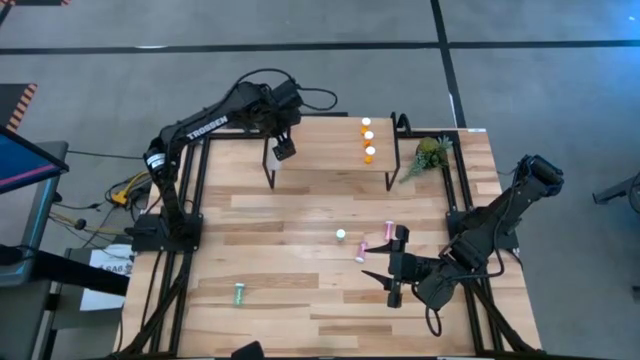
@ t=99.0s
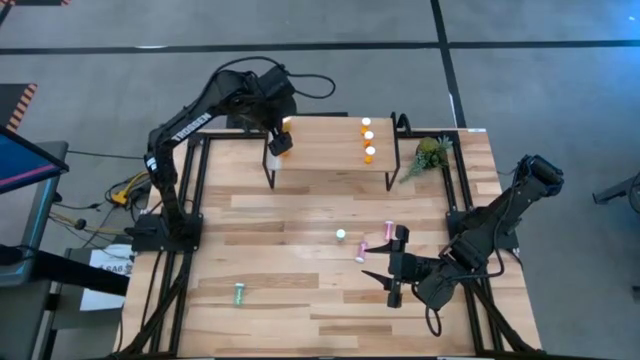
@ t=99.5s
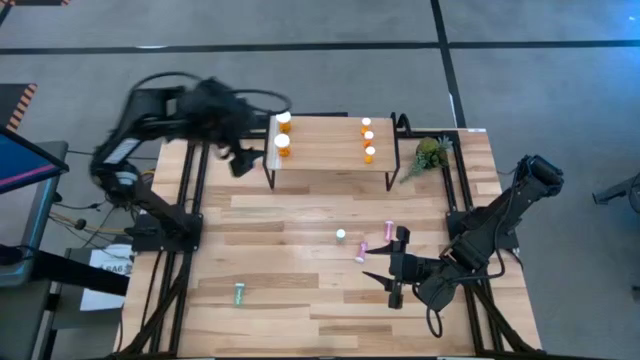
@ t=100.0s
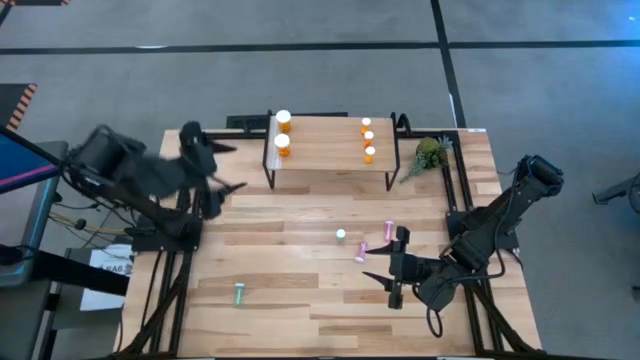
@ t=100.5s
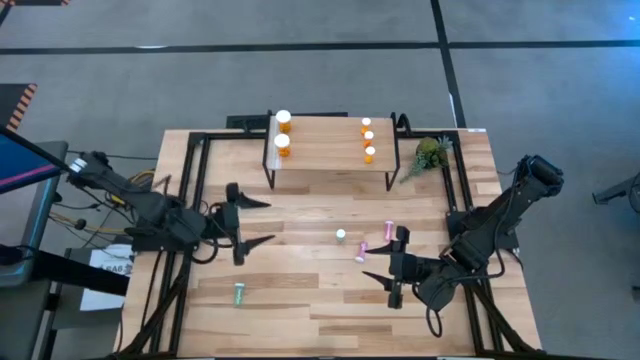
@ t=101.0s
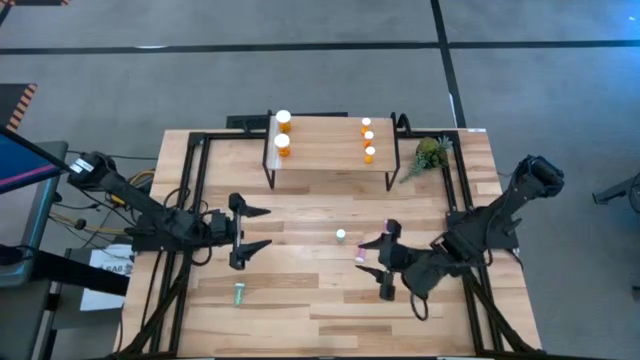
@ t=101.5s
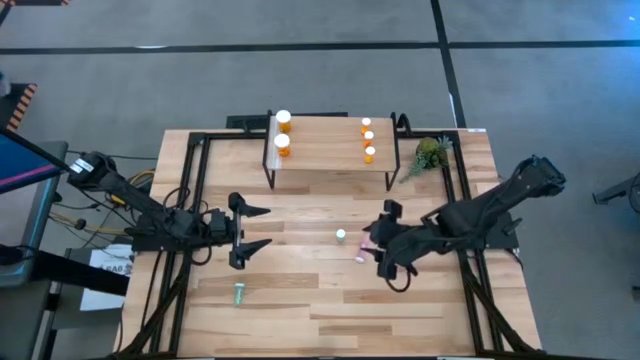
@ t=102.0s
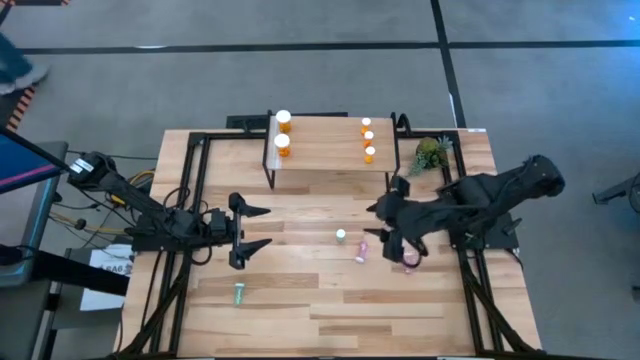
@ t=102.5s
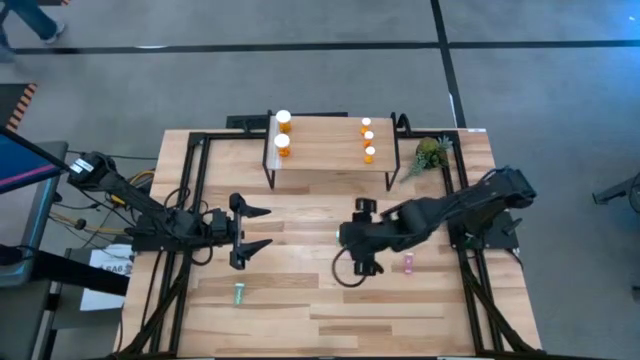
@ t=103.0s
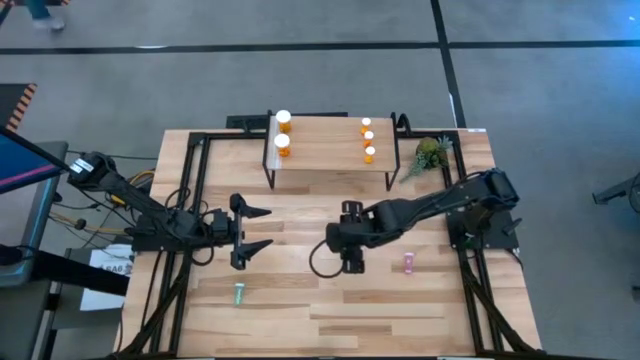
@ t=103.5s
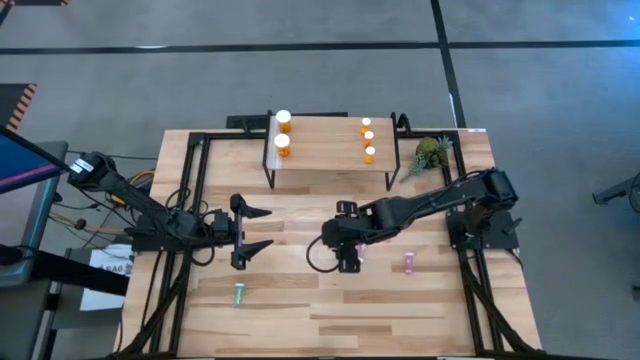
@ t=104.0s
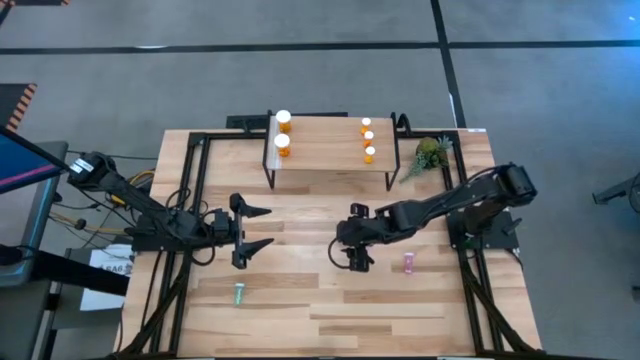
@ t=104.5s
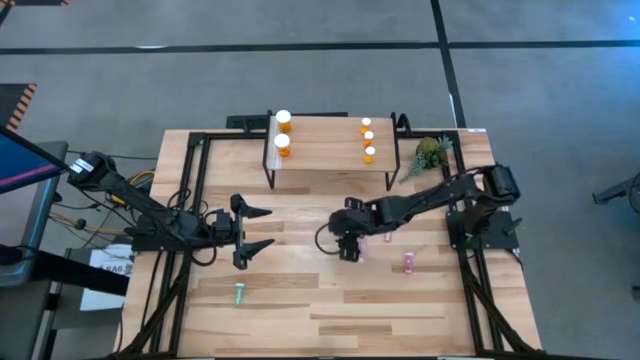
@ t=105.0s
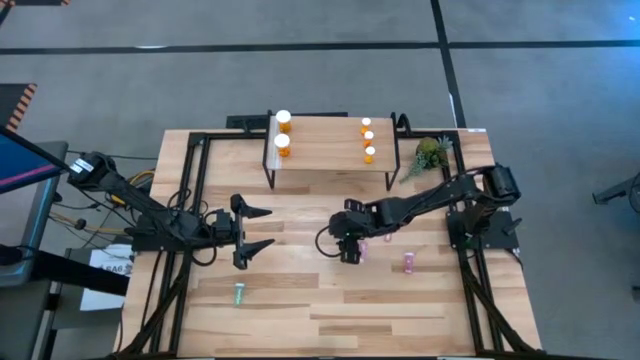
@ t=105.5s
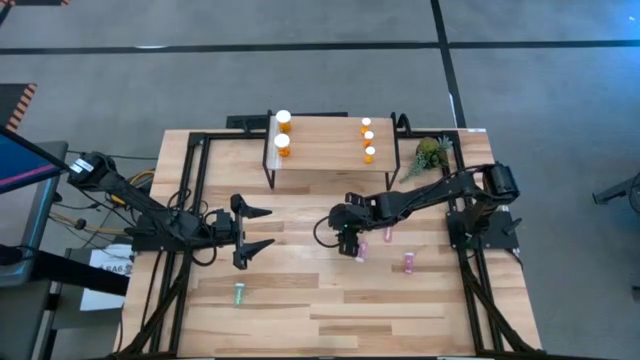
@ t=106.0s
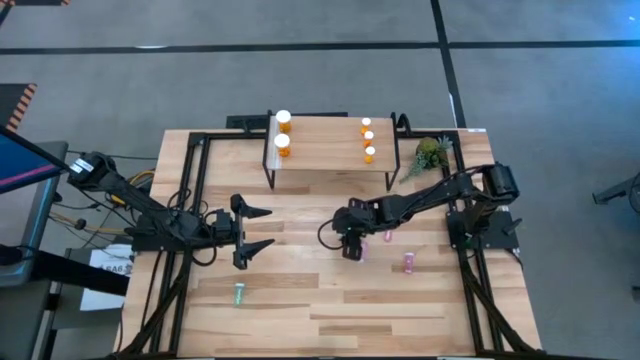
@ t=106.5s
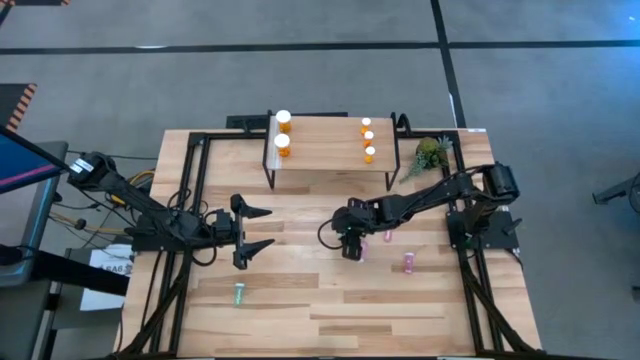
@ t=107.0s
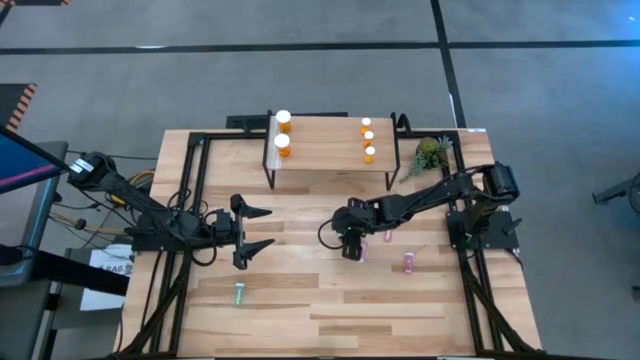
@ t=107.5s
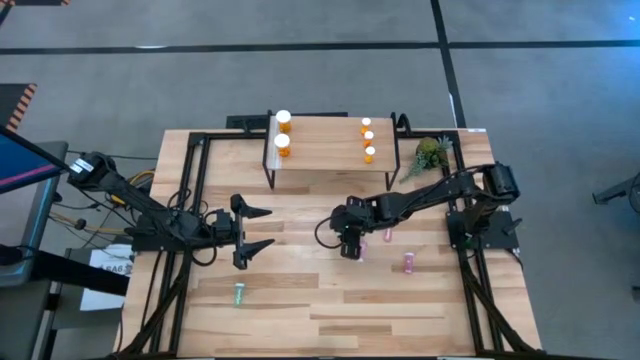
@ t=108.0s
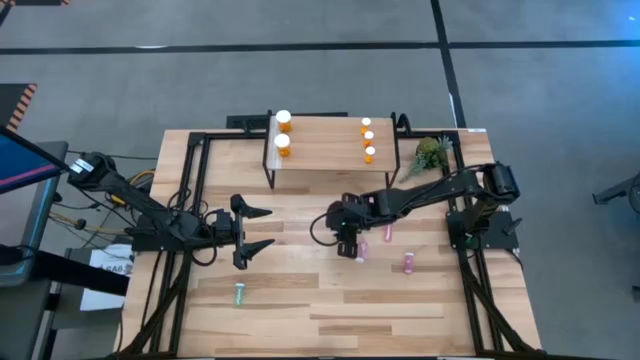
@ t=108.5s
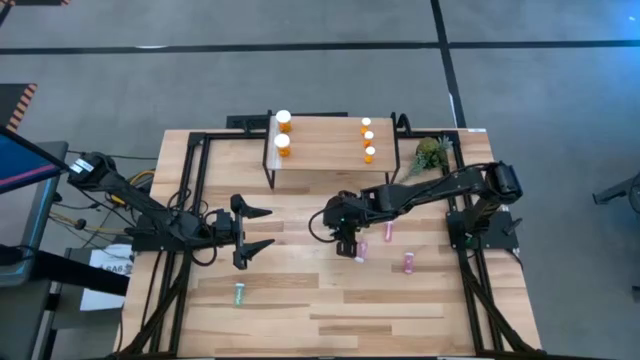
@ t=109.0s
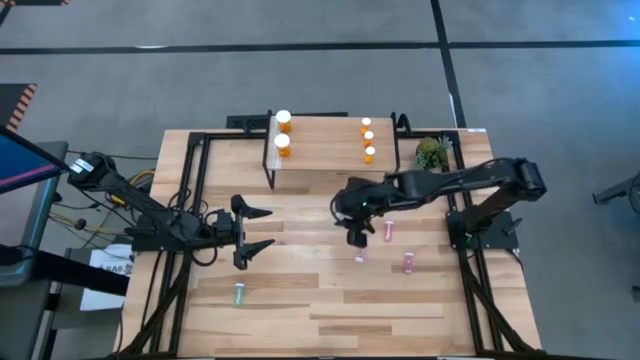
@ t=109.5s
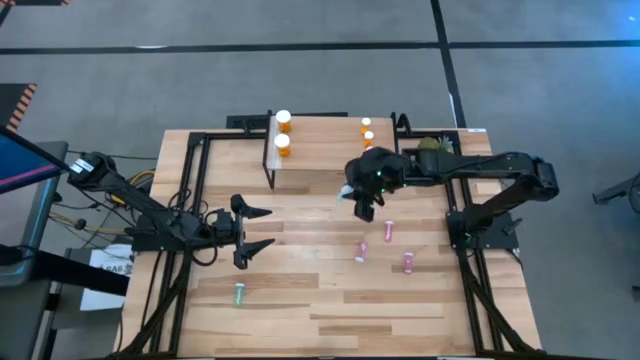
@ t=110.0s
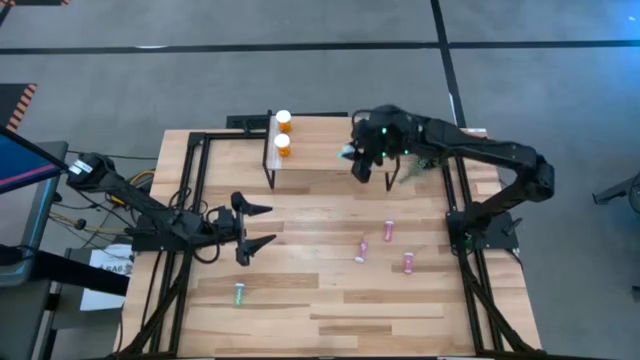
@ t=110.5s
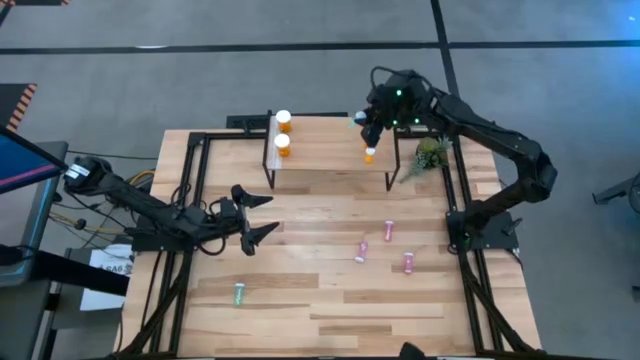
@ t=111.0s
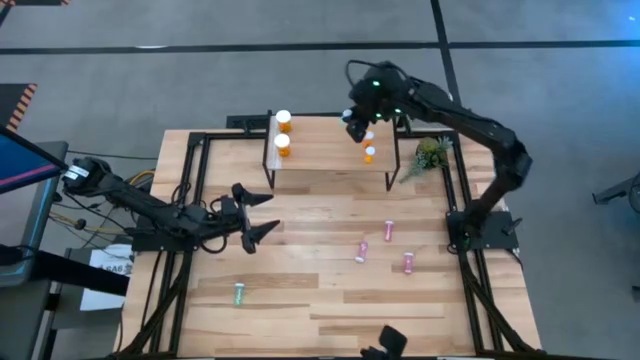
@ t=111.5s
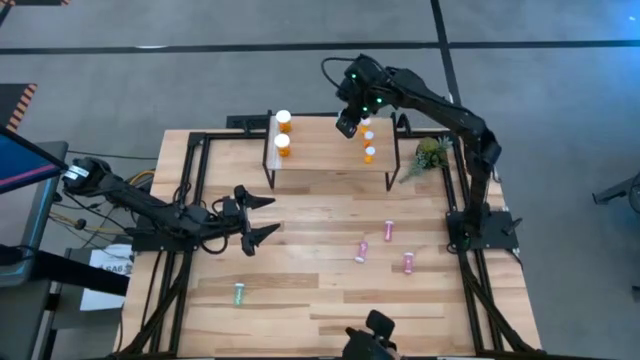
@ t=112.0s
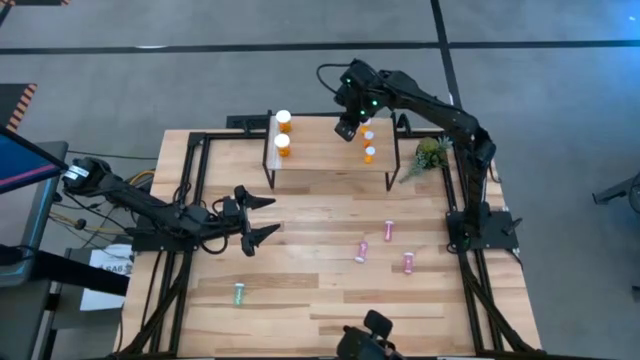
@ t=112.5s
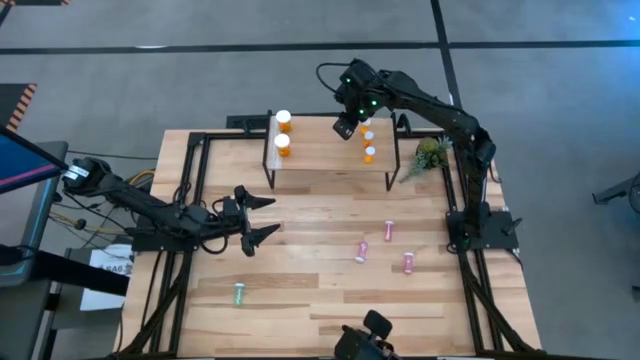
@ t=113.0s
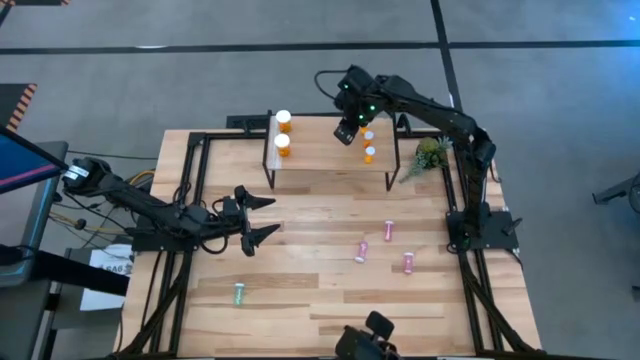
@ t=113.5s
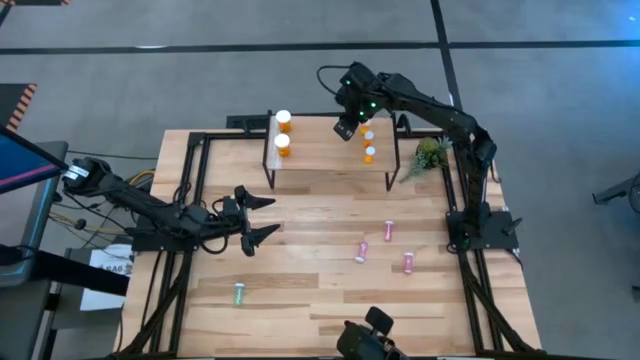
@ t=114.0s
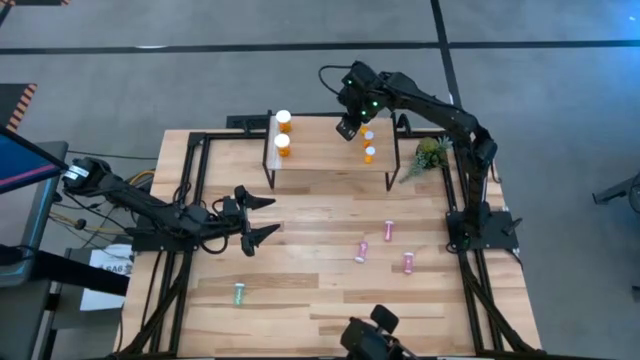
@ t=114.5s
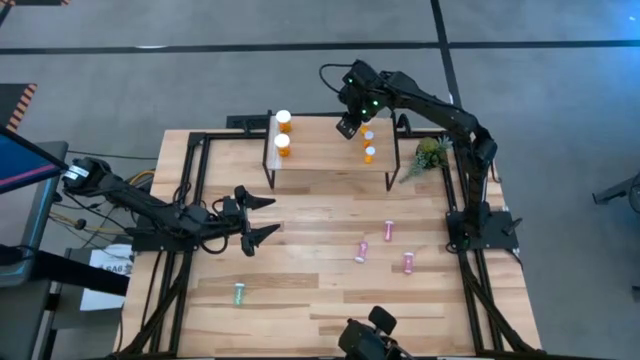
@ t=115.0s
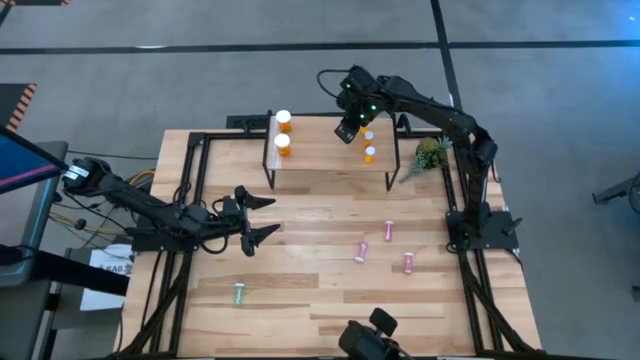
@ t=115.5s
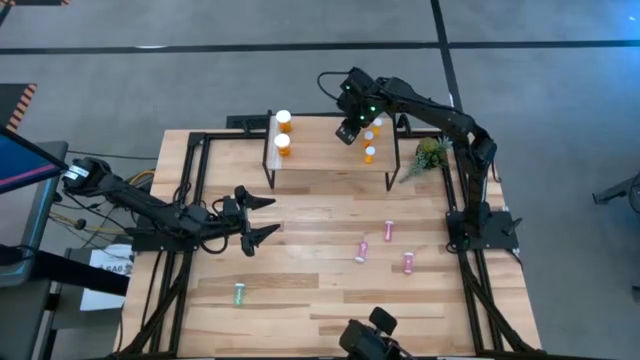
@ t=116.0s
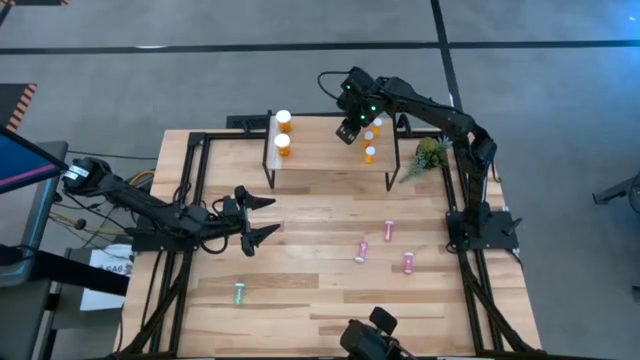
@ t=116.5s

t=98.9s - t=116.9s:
Task: Pick and place medicine bottles onto shelf by color
Put the top blue pill bottle on the shelf

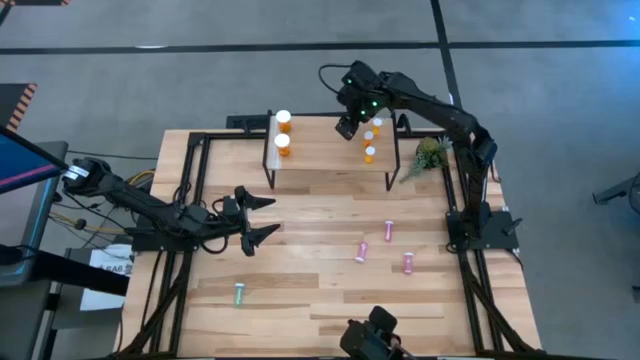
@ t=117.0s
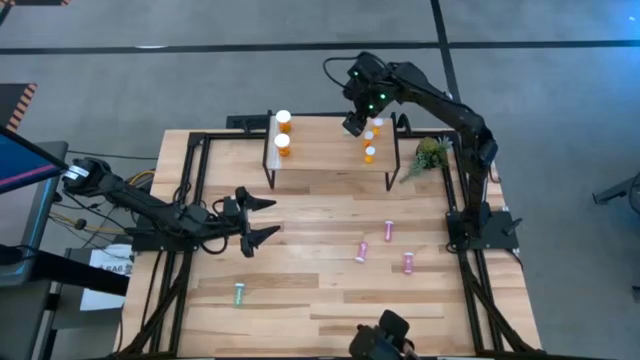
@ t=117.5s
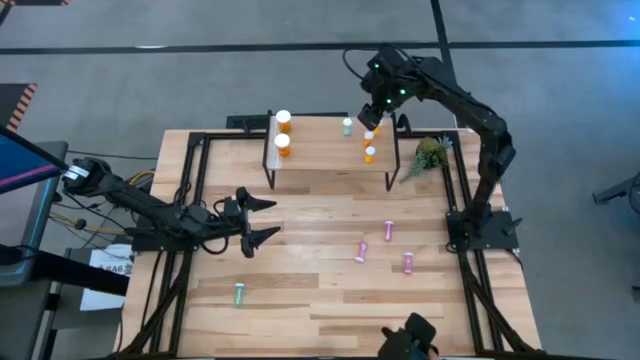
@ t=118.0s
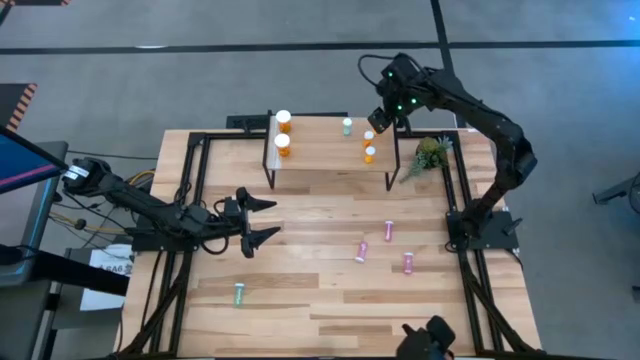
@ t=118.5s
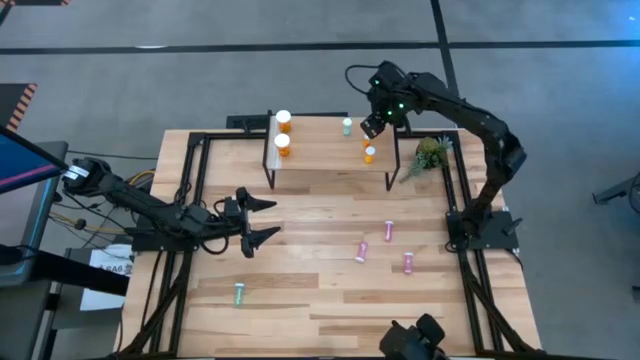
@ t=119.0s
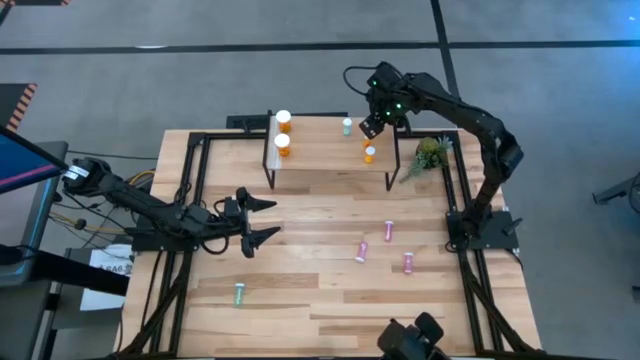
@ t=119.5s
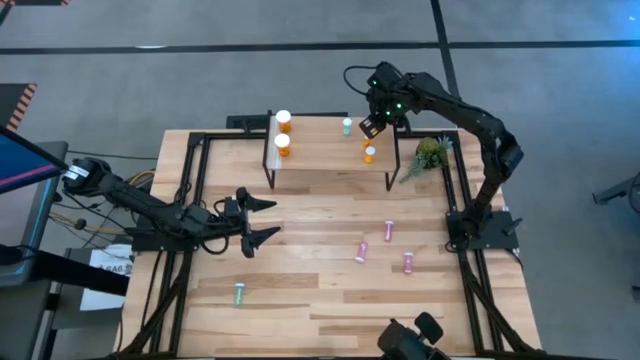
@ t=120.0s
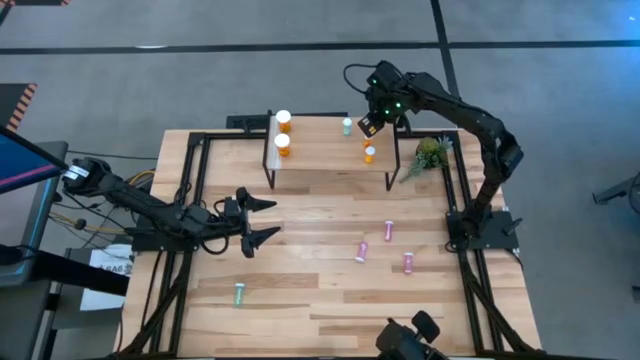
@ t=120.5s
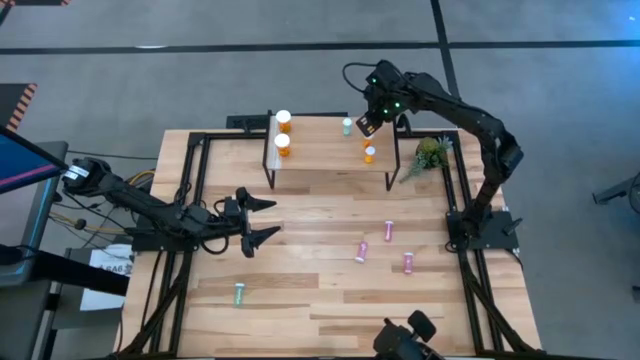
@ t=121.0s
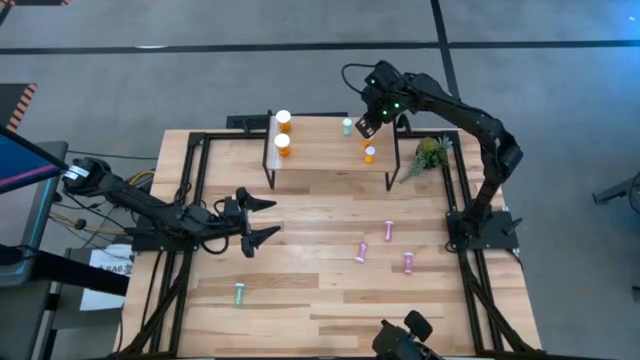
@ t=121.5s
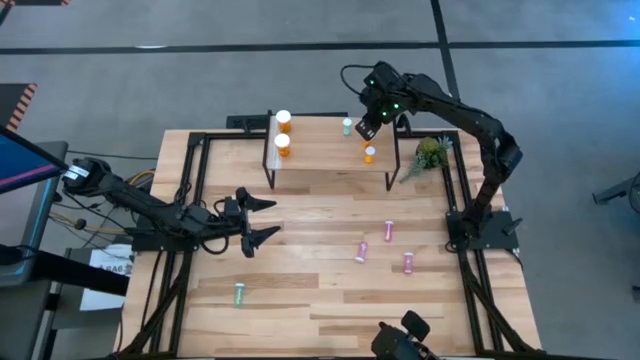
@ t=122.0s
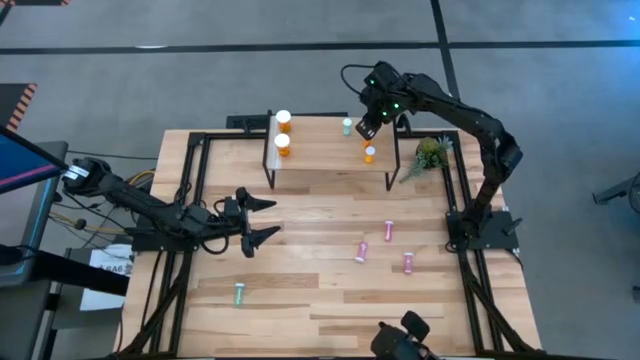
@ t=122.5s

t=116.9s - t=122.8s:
Adjust the small orange pill bottle on the shelf
